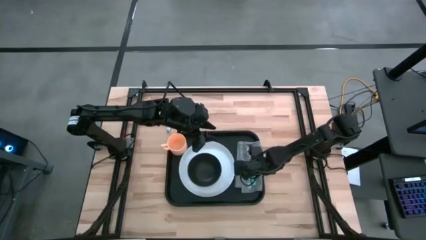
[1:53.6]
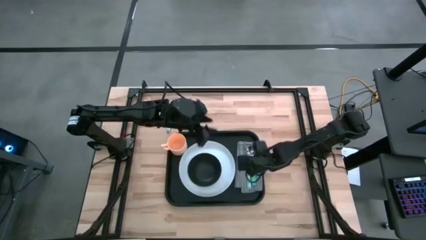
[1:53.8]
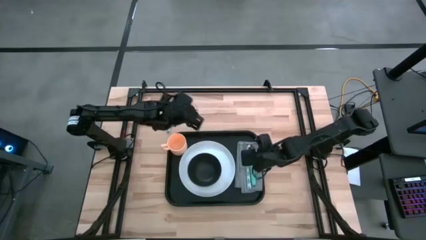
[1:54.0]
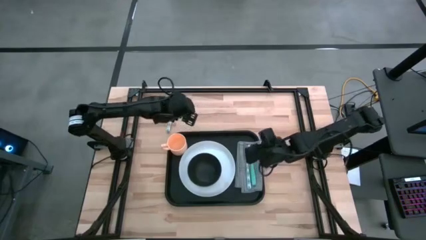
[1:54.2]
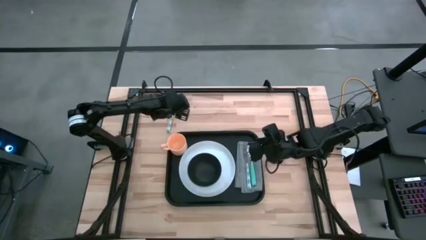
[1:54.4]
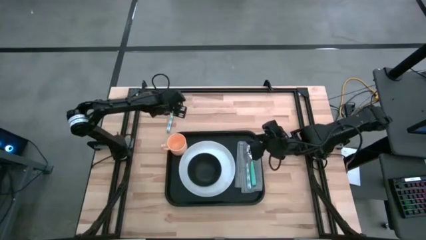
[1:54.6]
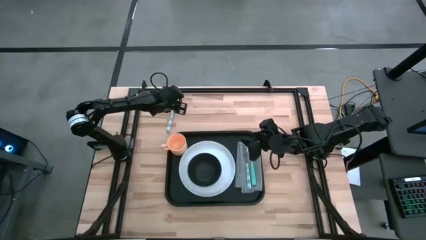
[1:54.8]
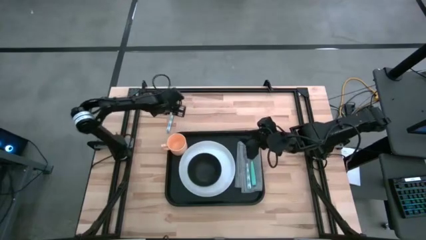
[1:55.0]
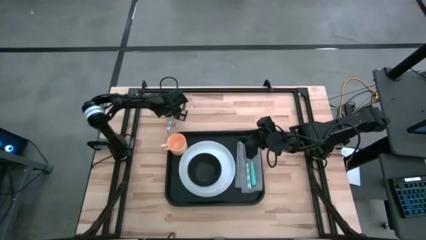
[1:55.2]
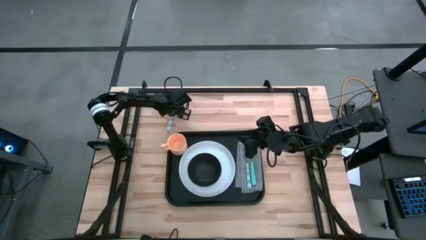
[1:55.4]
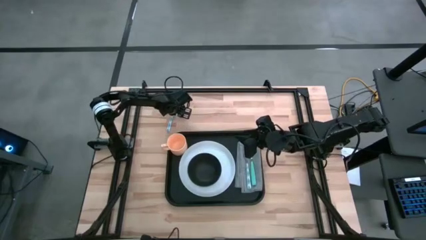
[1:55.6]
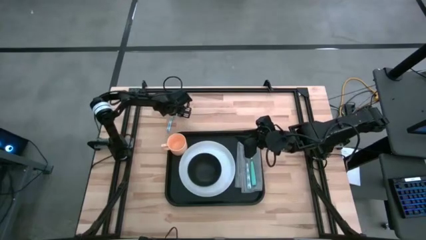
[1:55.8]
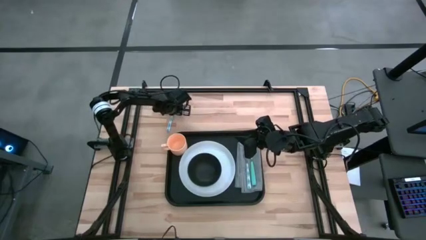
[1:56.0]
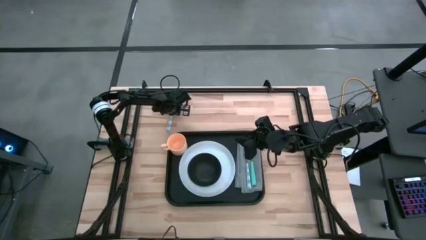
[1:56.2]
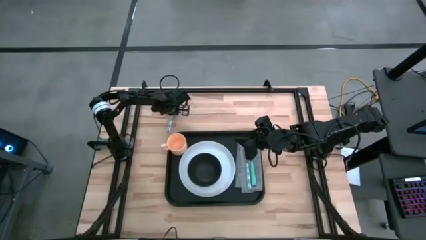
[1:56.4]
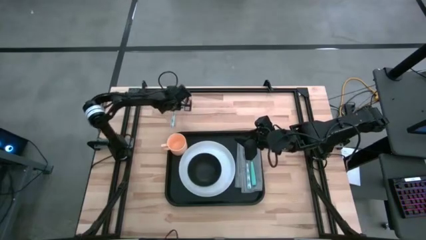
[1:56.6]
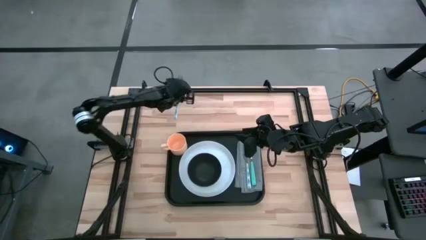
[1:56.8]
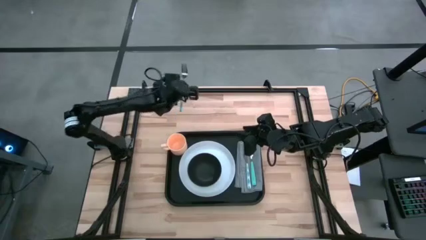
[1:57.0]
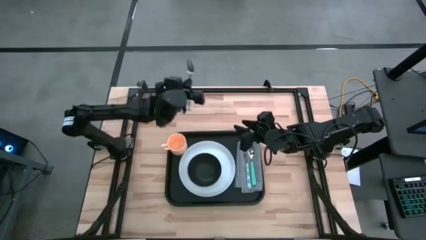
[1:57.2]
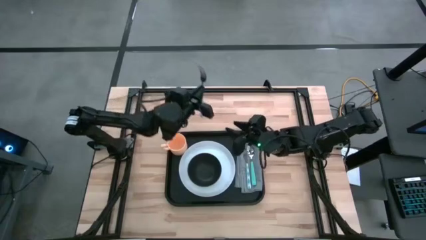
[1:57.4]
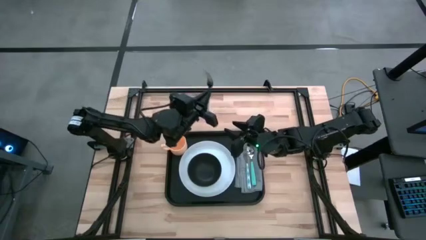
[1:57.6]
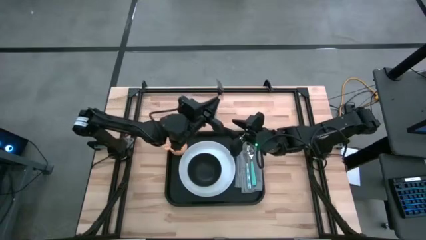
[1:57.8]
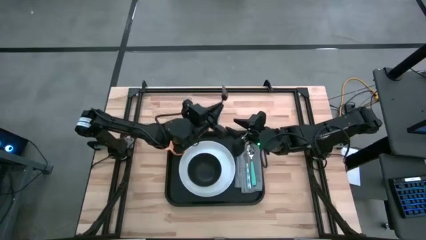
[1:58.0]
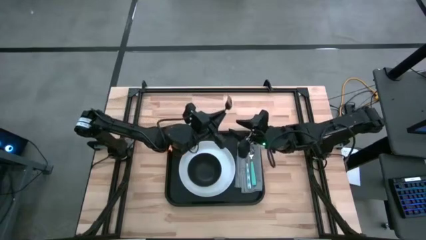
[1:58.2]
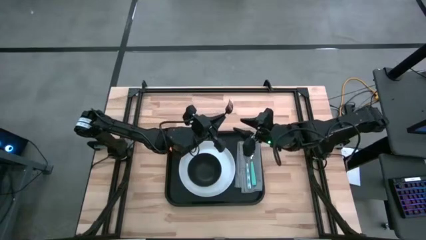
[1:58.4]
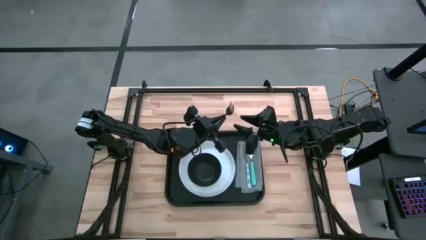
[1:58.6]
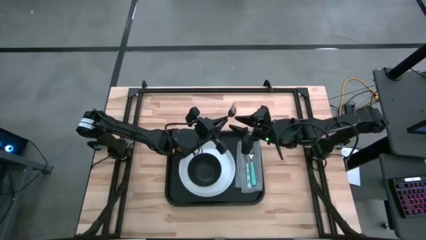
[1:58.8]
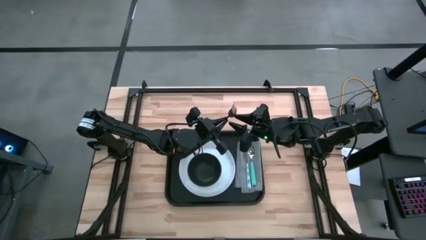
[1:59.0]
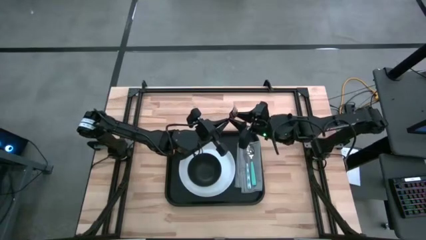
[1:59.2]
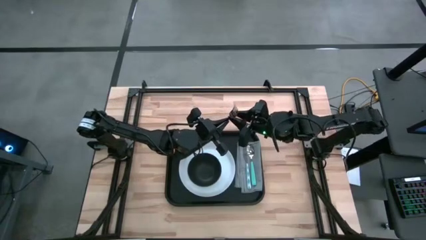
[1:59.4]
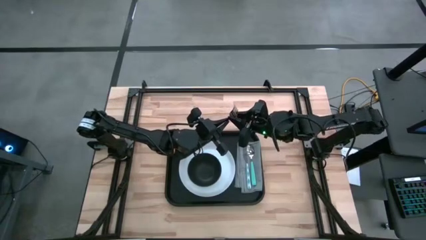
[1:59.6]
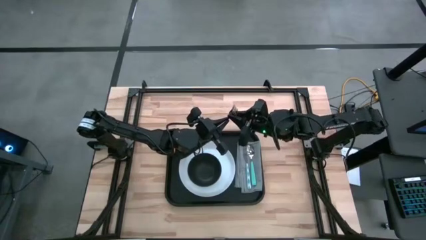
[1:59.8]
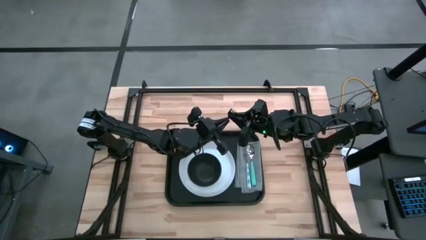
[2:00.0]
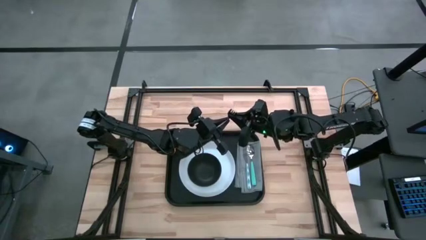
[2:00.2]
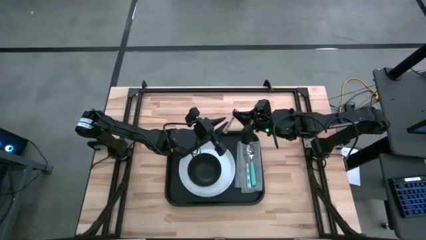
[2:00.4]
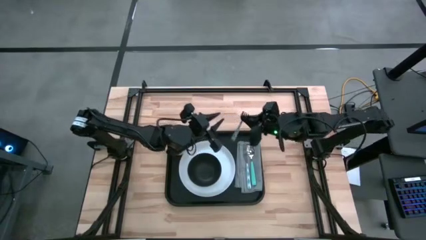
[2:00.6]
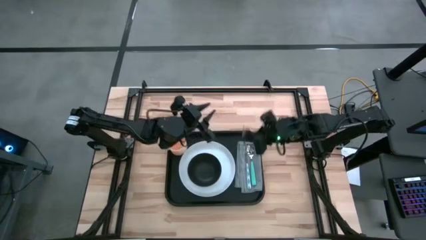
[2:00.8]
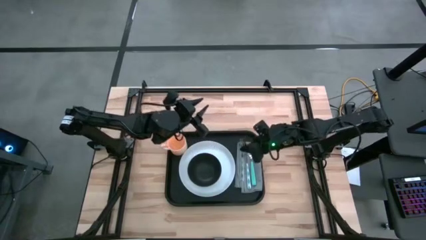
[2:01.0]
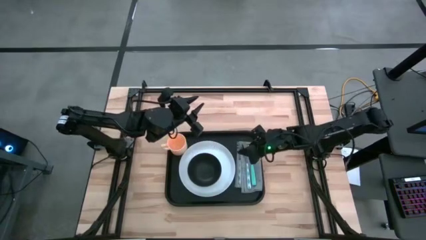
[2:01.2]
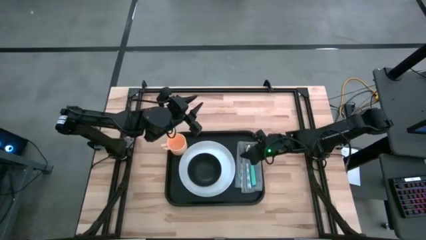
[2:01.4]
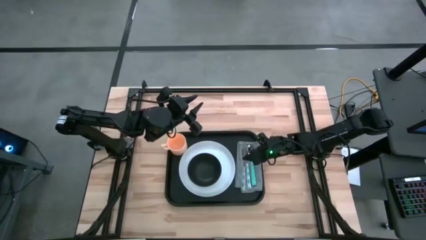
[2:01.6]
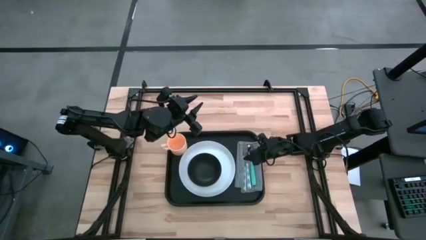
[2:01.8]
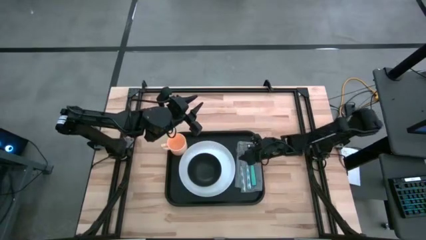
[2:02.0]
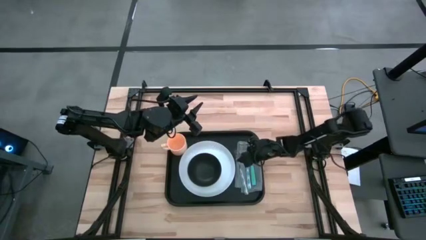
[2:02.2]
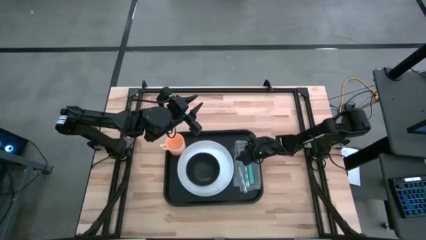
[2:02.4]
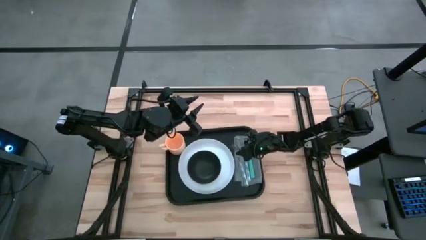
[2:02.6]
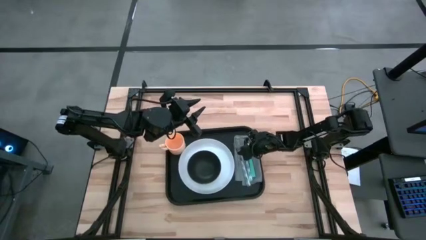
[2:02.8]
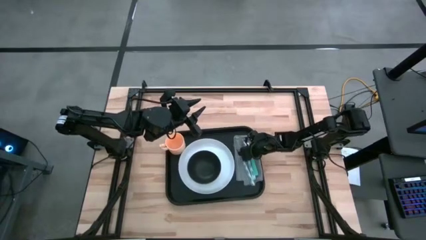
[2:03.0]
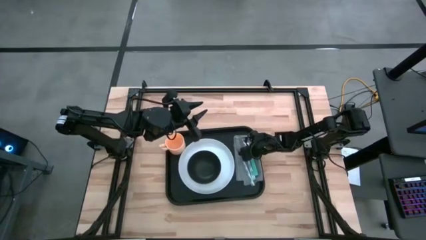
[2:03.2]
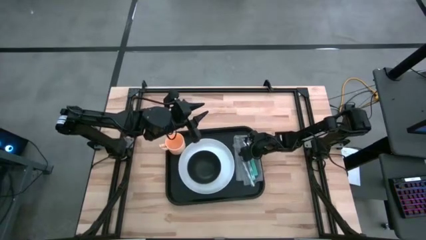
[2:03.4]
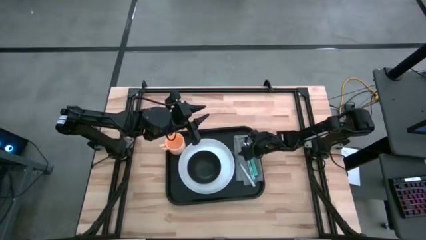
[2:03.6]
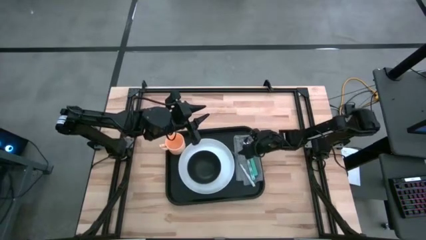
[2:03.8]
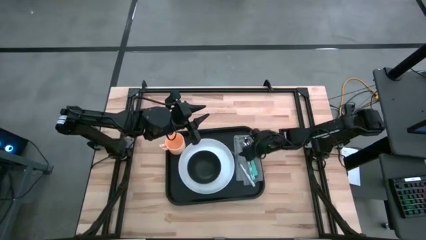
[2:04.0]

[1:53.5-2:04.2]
Task: Set up tray
Put the blue fork on the gray napkin

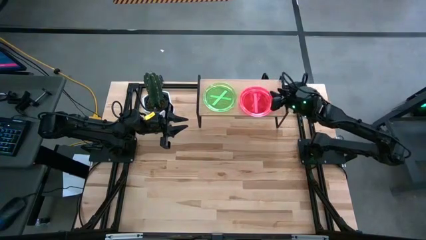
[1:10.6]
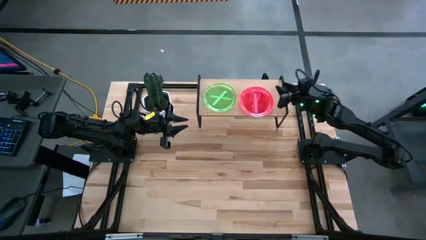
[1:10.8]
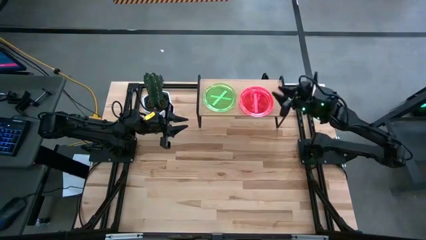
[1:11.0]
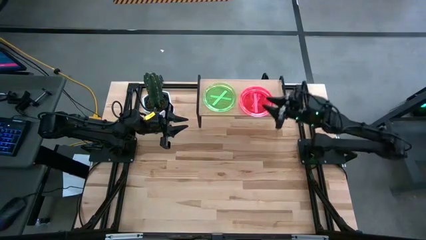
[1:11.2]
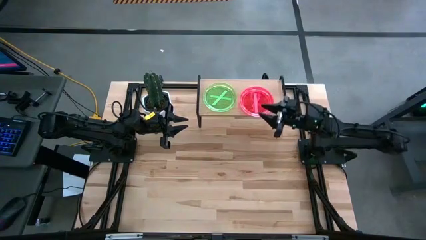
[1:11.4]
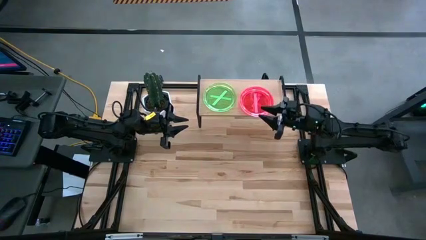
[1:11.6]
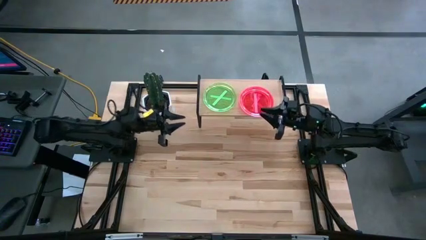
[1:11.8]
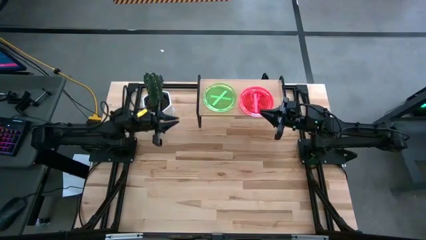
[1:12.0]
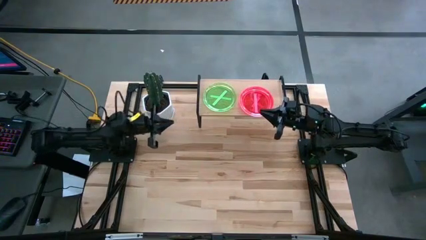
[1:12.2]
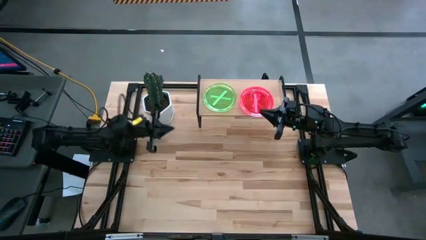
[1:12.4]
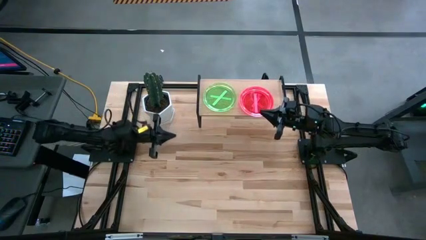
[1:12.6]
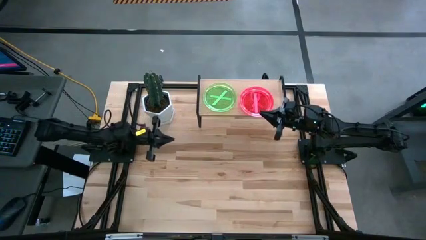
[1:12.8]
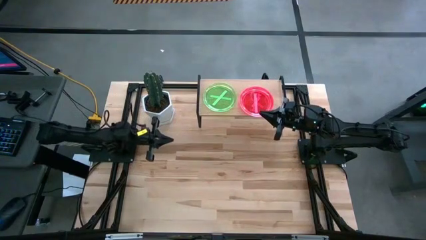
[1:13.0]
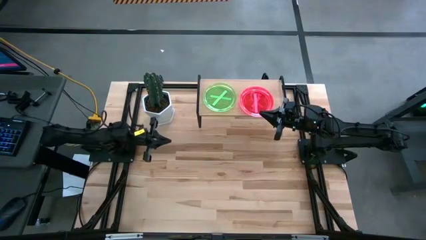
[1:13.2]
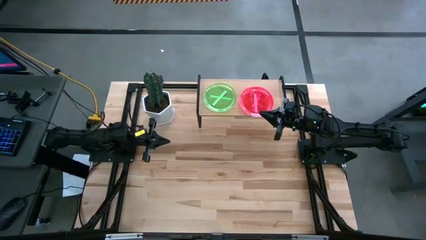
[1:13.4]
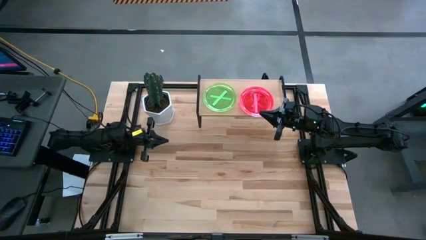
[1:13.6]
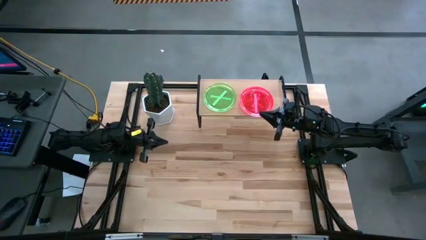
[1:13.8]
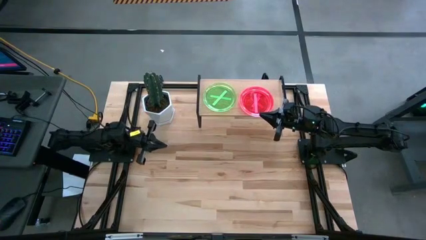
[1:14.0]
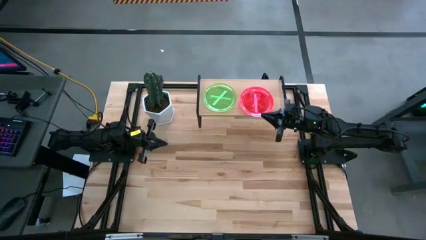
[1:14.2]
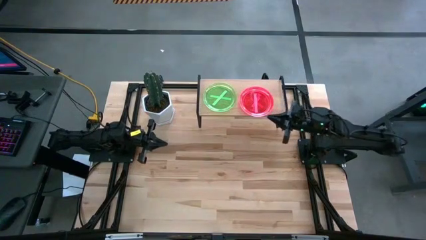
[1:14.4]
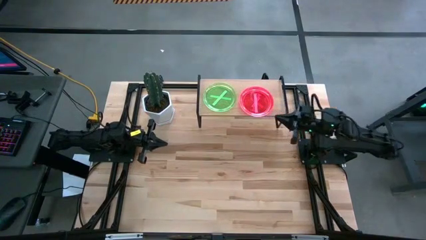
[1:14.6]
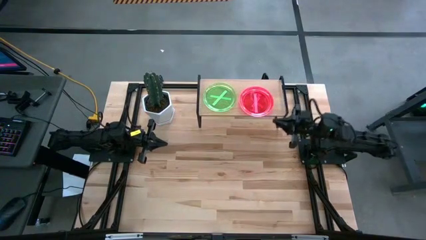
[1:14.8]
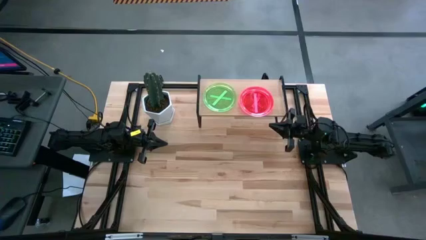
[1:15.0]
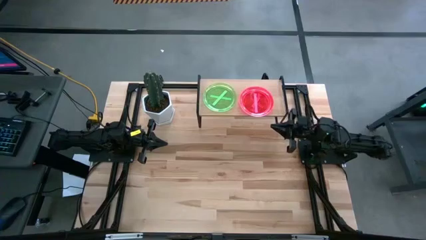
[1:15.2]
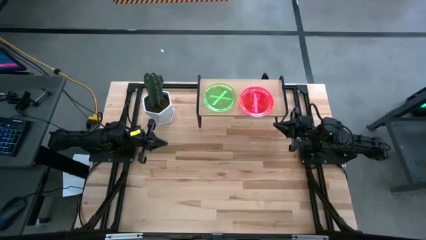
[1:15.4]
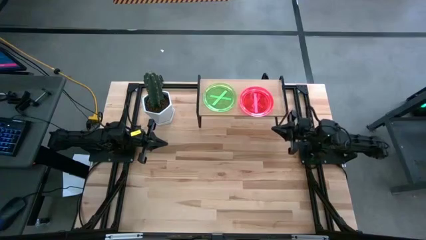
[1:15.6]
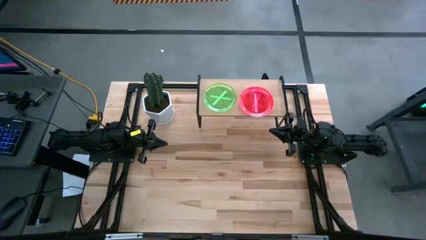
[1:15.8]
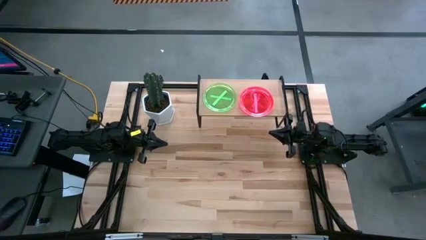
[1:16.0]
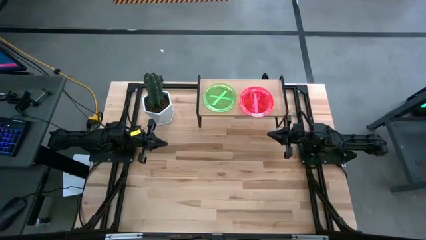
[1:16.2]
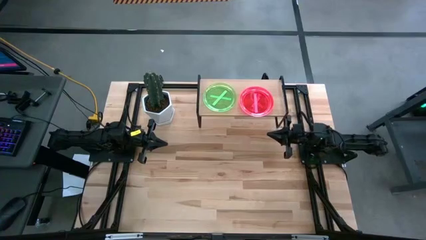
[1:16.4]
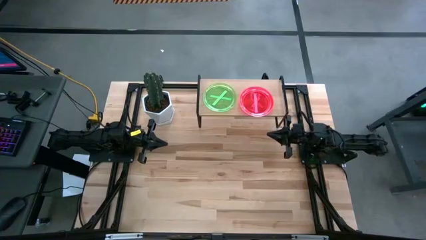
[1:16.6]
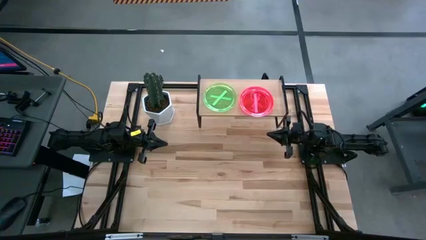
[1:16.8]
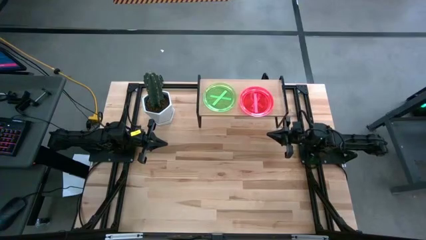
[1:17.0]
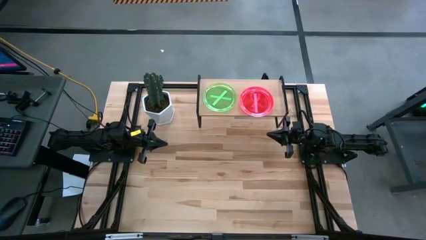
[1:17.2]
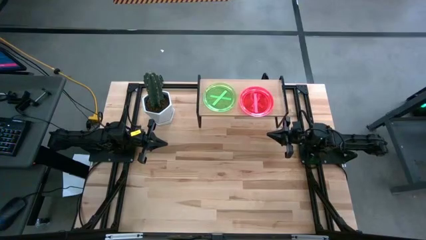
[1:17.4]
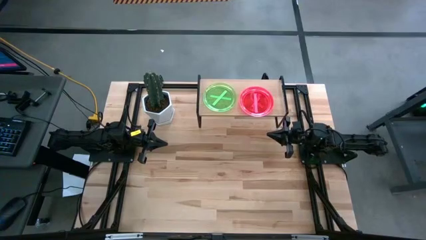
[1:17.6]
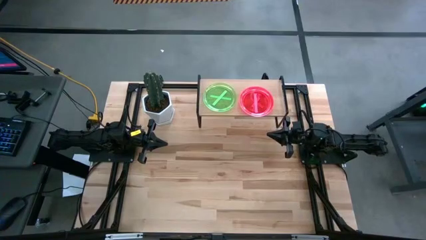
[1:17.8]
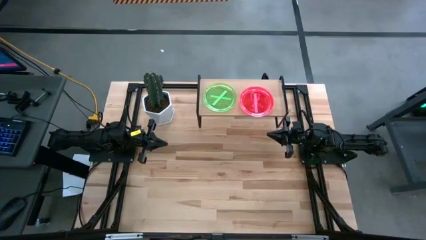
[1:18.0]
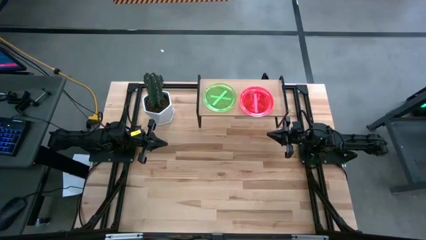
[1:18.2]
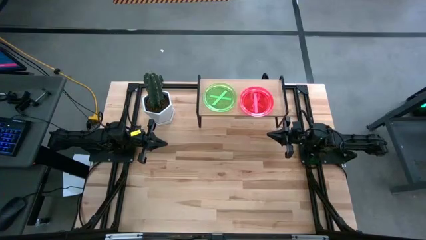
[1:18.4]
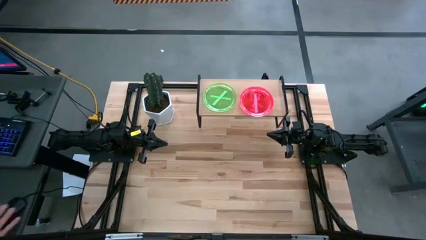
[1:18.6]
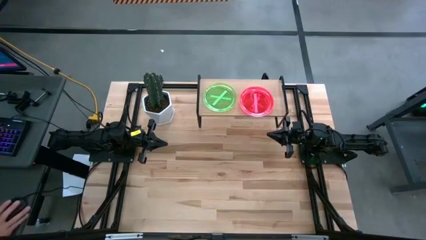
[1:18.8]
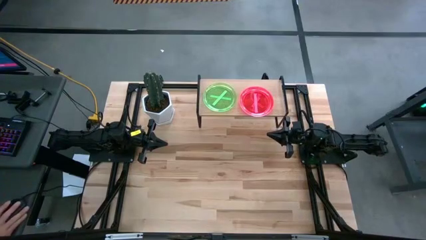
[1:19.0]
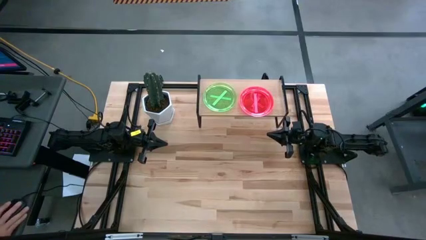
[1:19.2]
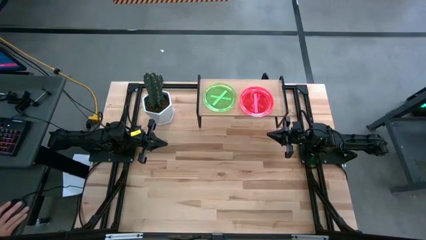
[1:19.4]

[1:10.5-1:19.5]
Task: Place and stack plates onto a shelf
Return to Home Position
